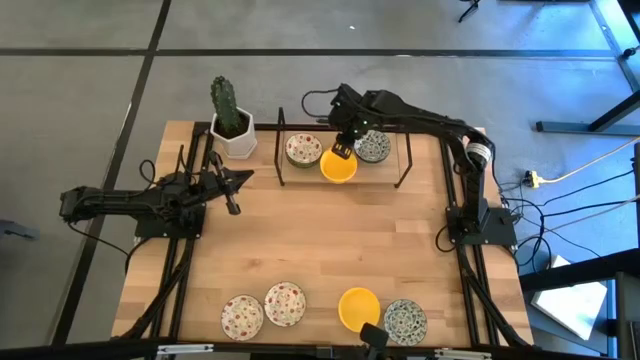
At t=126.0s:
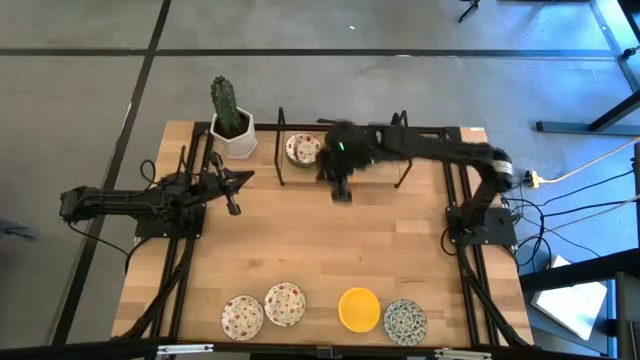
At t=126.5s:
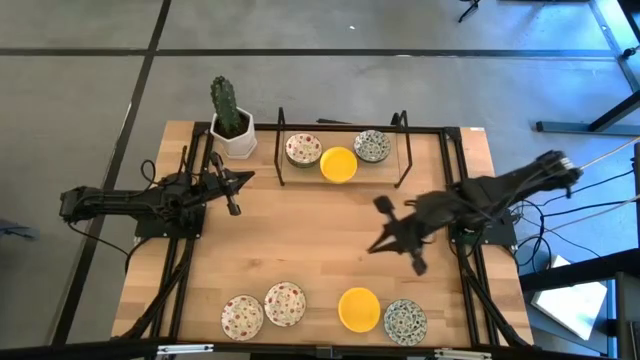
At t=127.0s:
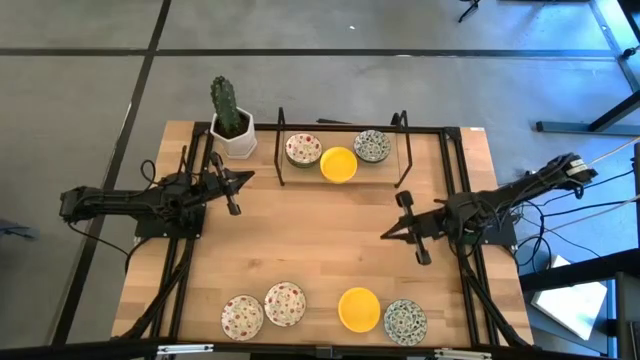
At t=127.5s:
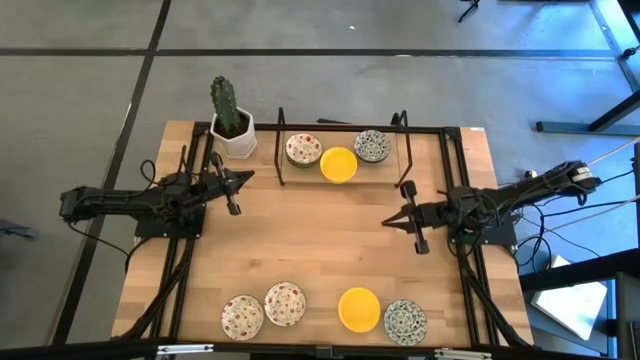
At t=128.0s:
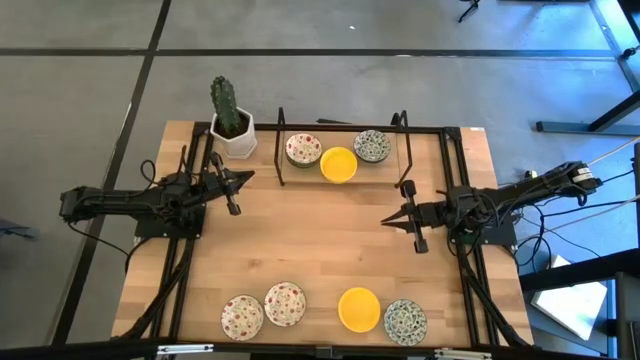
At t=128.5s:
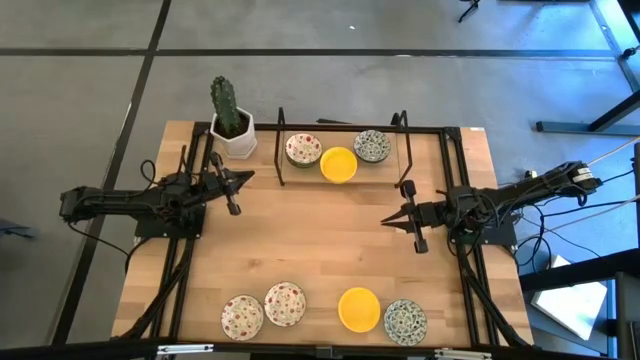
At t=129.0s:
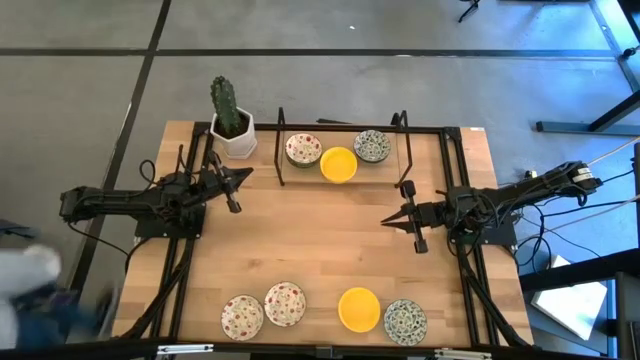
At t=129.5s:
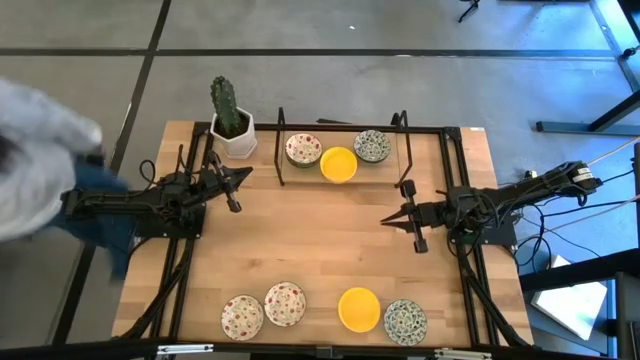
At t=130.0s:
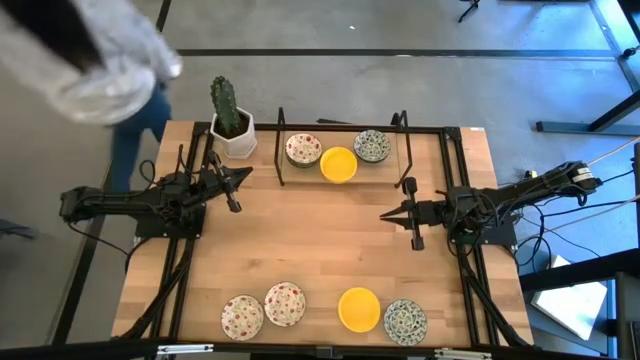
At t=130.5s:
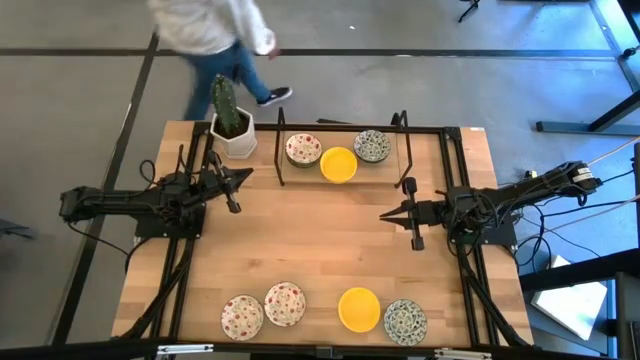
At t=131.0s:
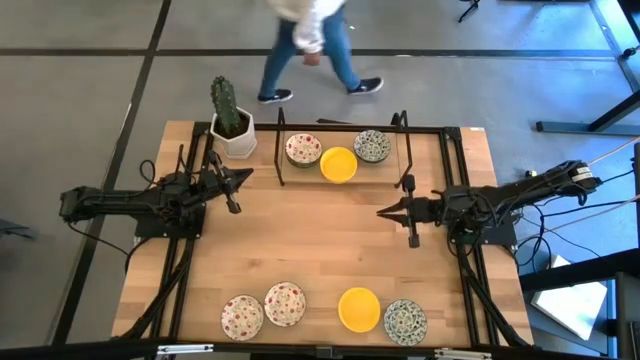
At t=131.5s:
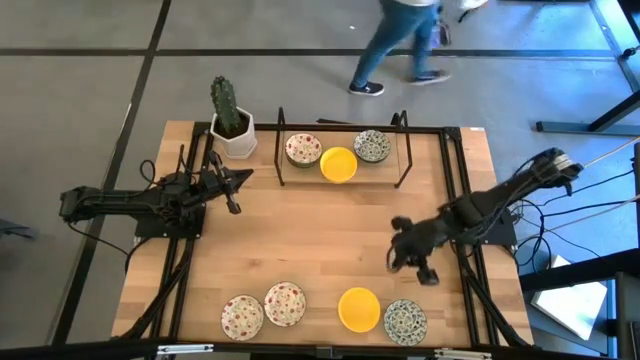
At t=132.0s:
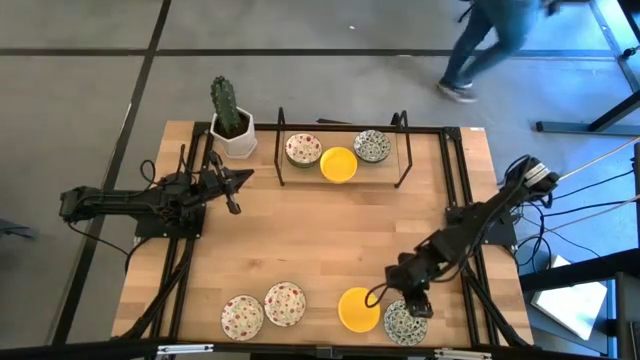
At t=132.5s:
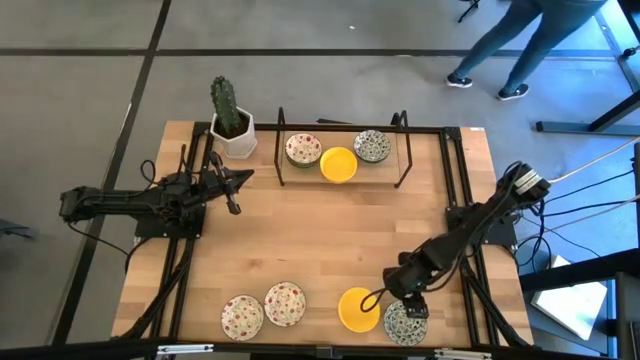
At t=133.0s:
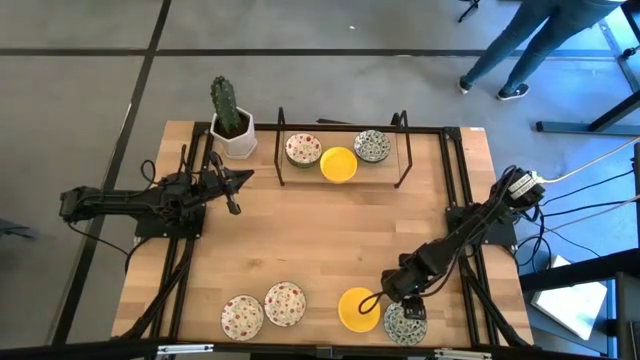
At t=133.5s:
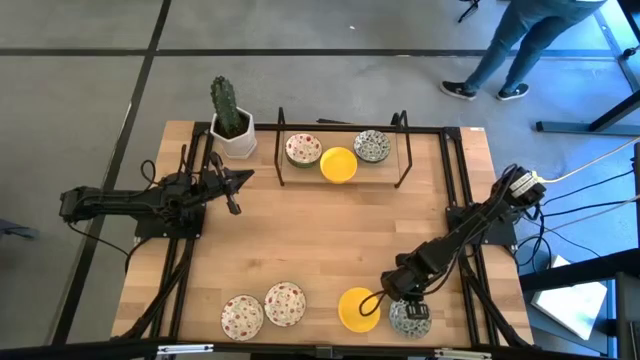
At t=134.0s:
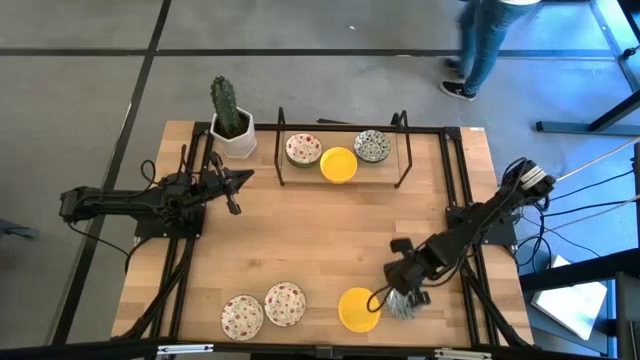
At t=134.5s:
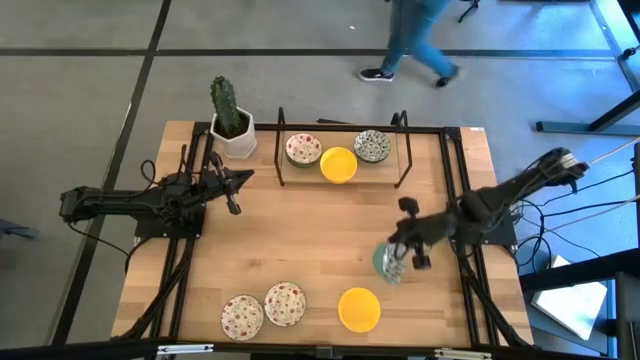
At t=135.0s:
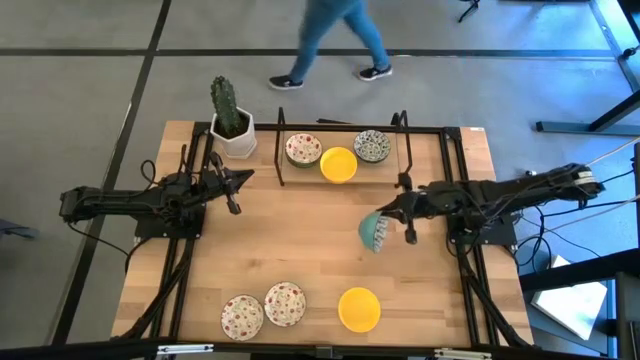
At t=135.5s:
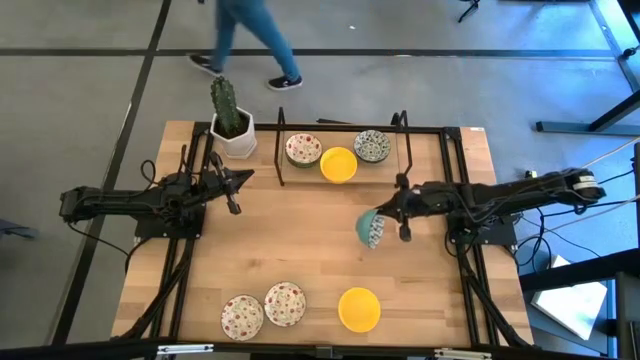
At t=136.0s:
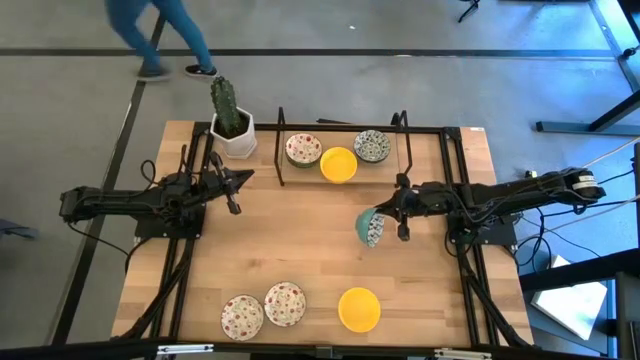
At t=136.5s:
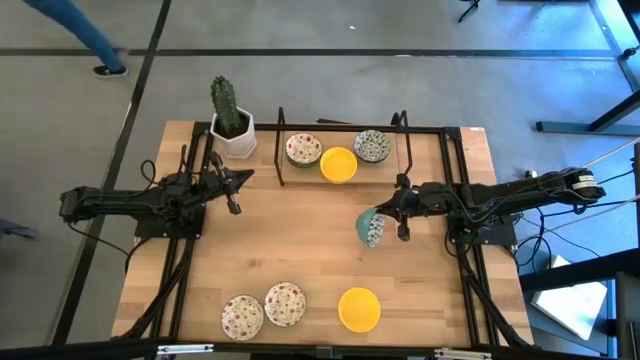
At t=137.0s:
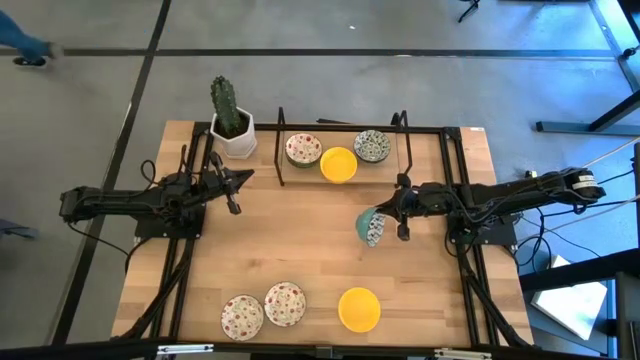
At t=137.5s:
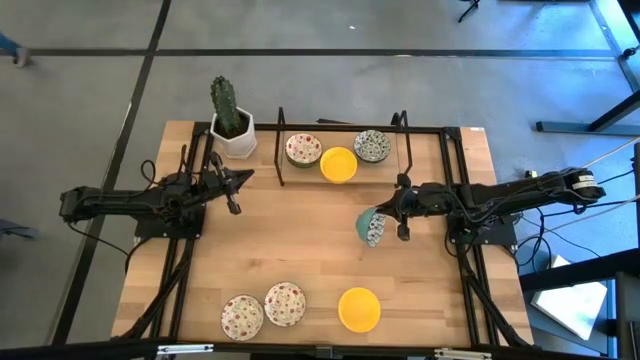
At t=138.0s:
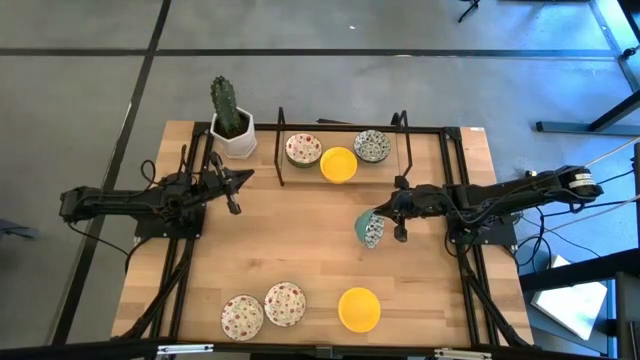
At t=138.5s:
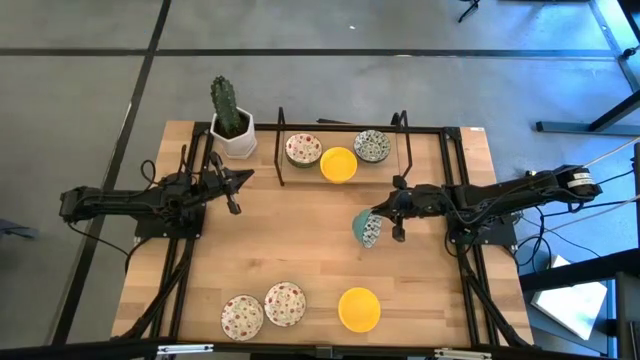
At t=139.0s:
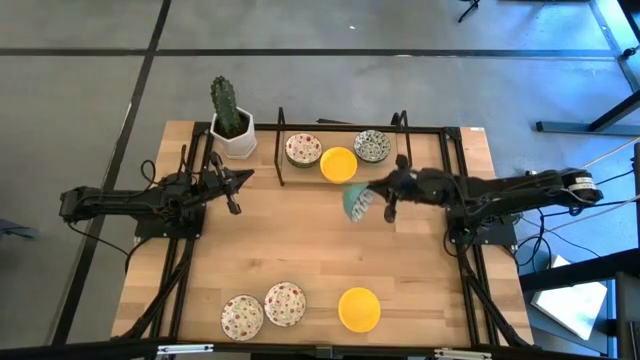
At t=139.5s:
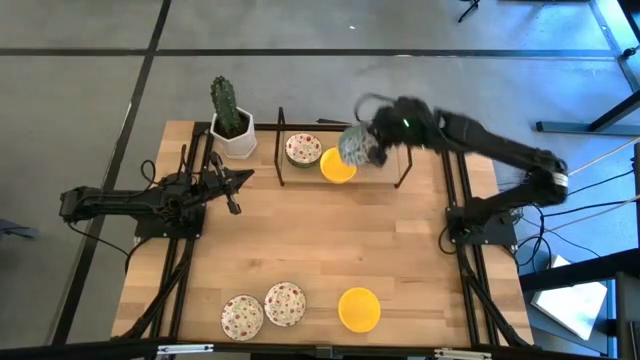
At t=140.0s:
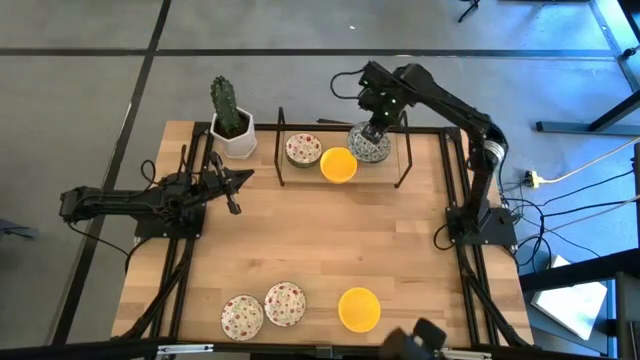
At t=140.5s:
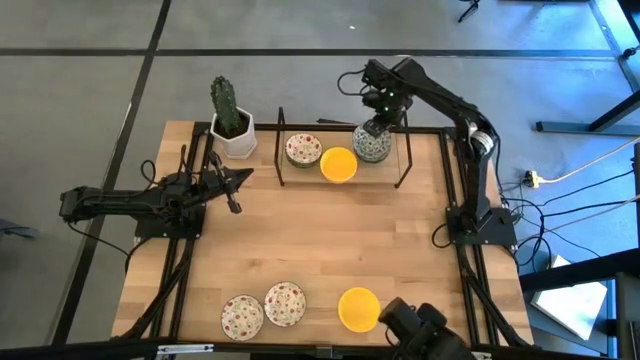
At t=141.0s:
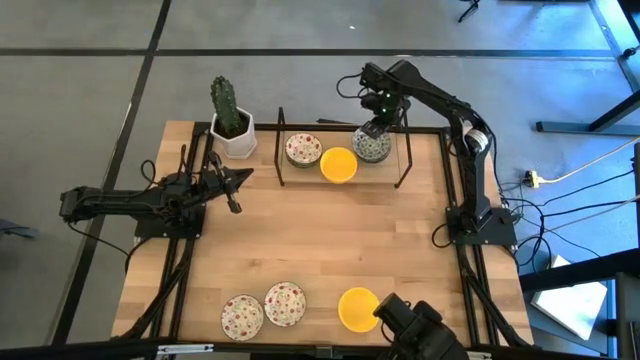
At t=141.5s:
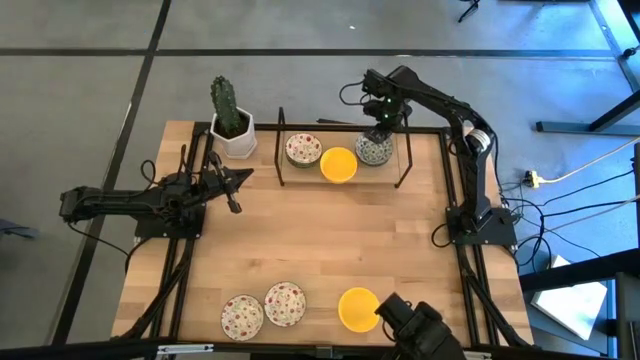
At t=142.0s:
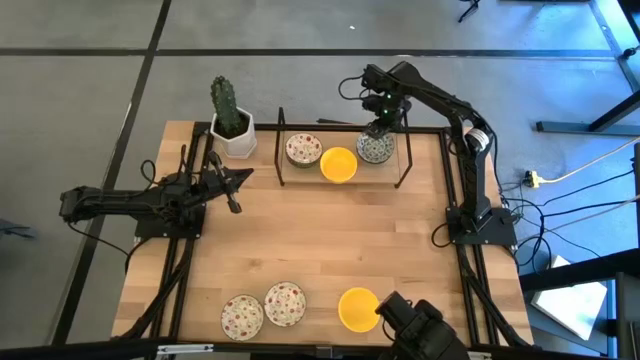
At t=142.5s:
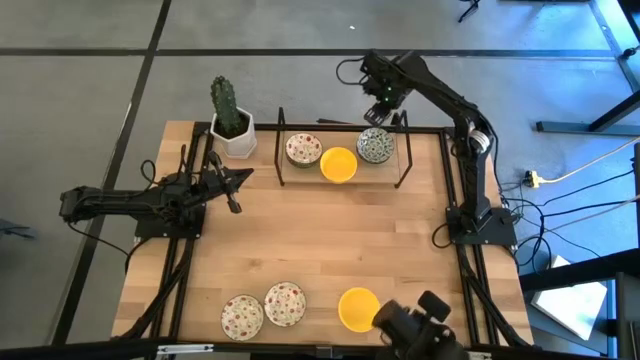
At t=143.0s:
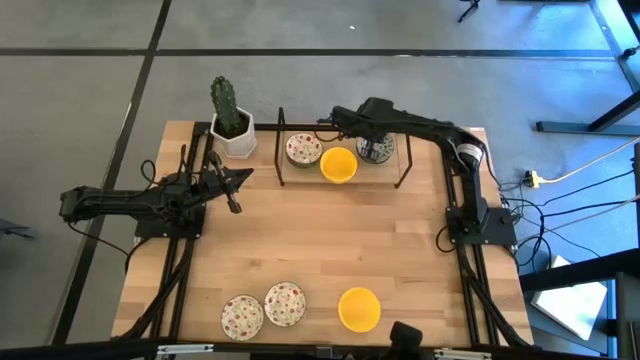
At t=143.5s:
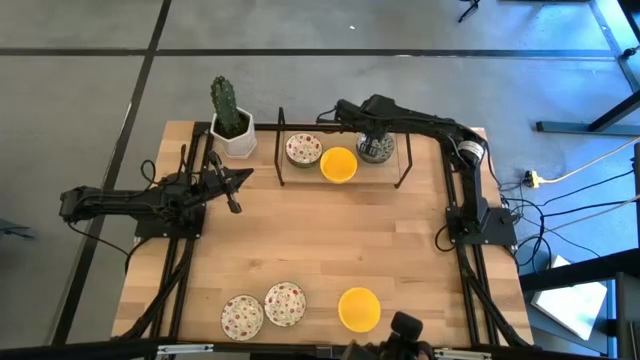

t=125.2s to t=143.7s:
Task: Pick & Place Mini bowls
Stack the white blue patterned bowl on top of the white blue patterned bowl on the shelf
